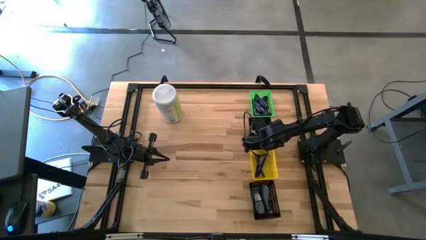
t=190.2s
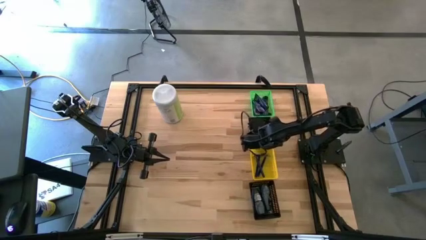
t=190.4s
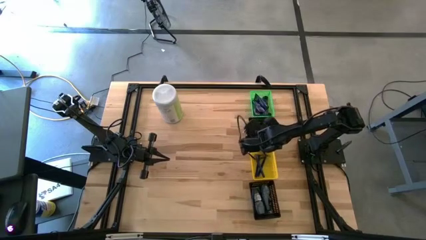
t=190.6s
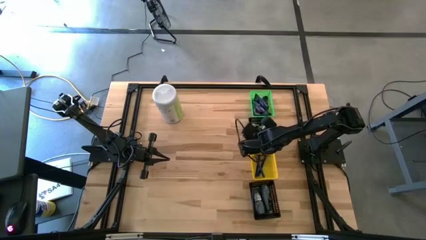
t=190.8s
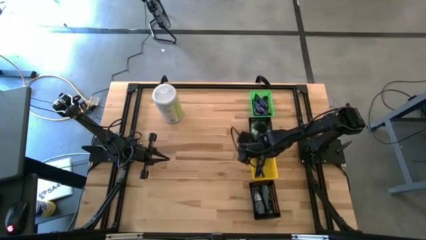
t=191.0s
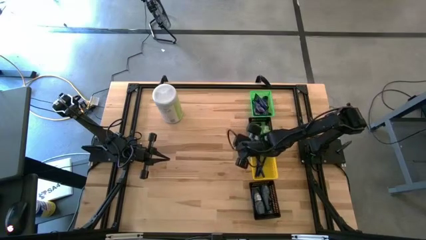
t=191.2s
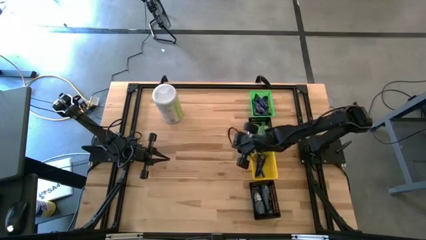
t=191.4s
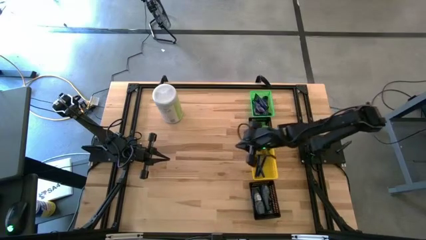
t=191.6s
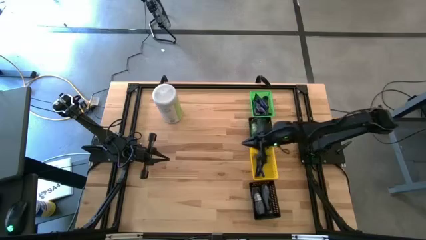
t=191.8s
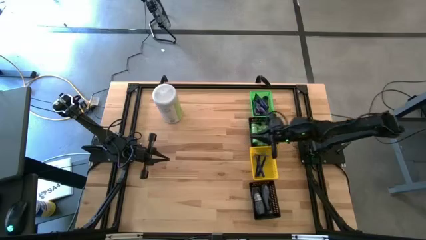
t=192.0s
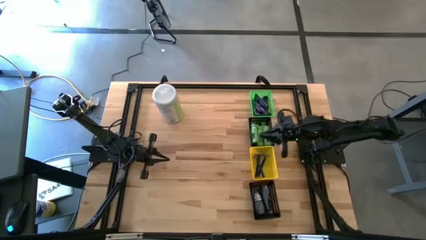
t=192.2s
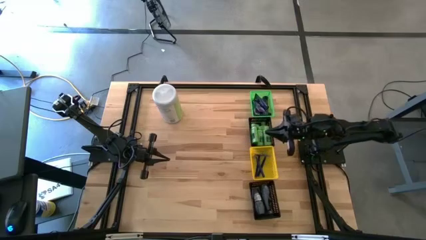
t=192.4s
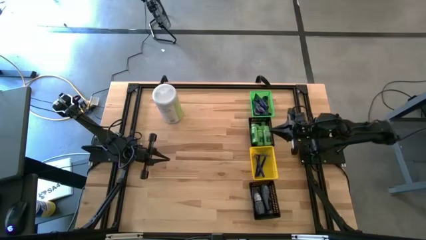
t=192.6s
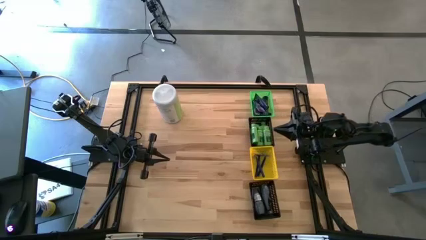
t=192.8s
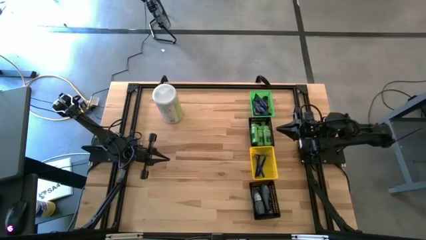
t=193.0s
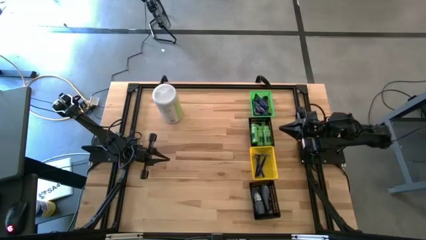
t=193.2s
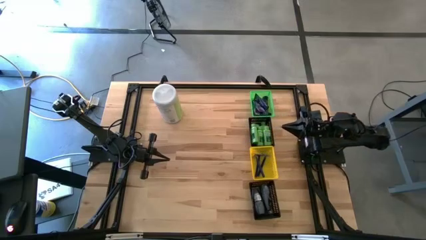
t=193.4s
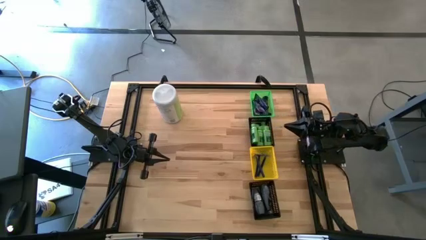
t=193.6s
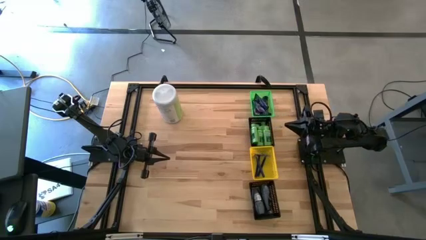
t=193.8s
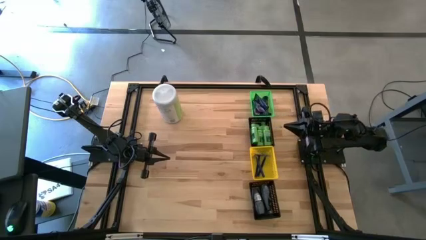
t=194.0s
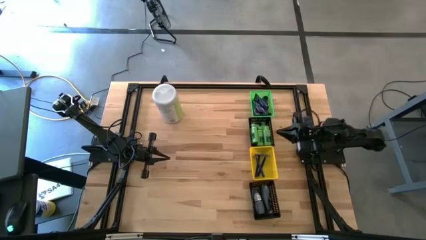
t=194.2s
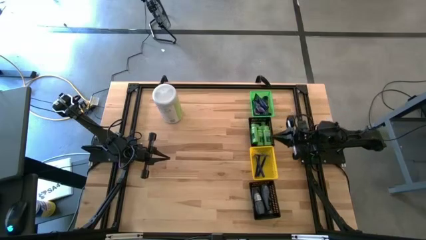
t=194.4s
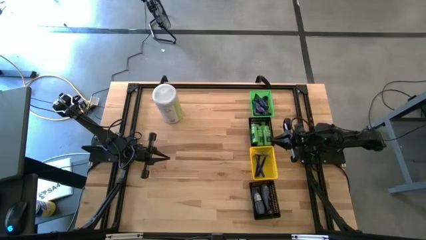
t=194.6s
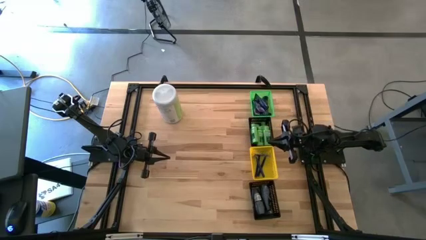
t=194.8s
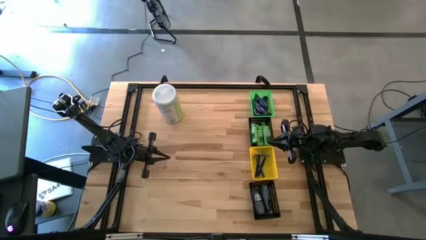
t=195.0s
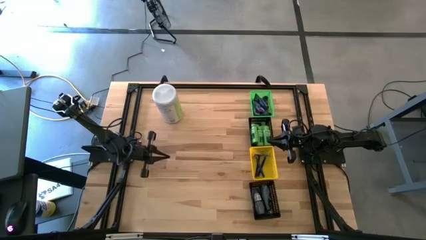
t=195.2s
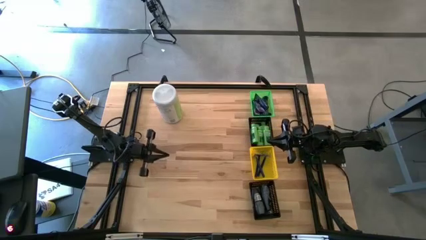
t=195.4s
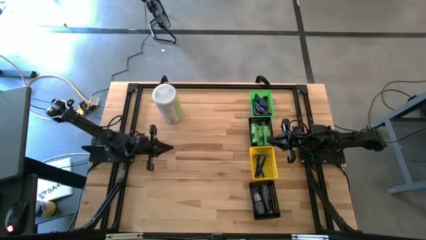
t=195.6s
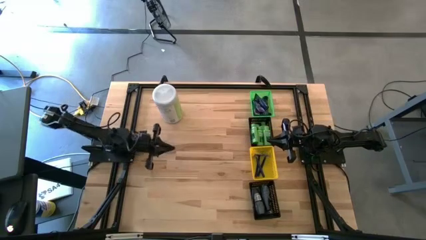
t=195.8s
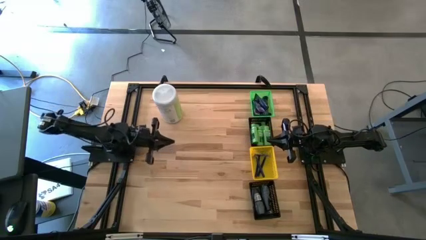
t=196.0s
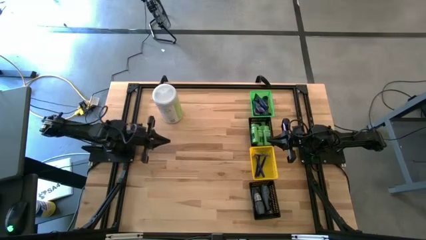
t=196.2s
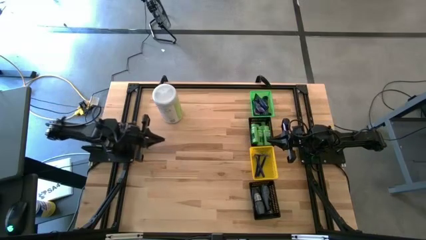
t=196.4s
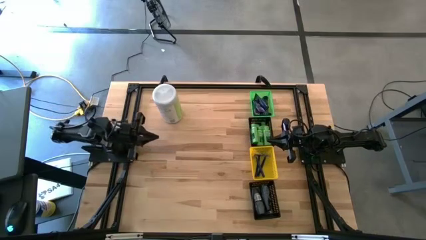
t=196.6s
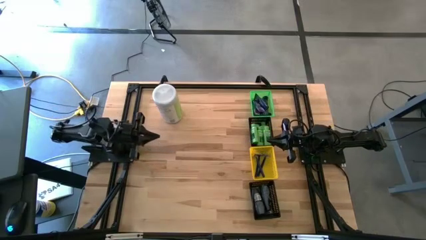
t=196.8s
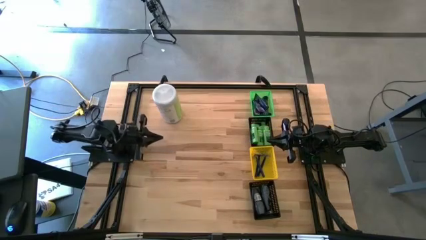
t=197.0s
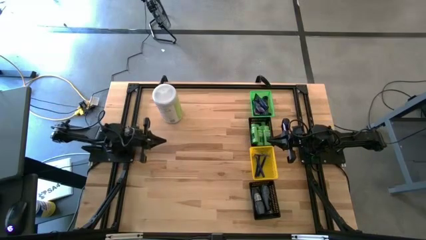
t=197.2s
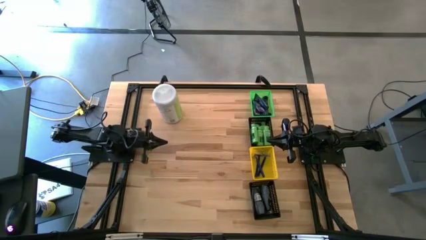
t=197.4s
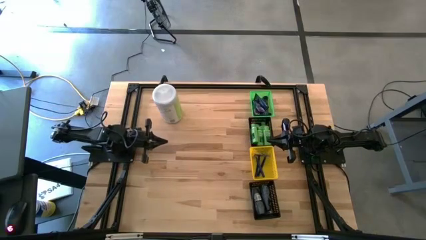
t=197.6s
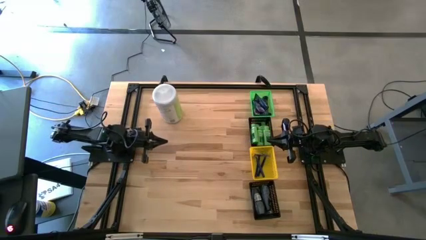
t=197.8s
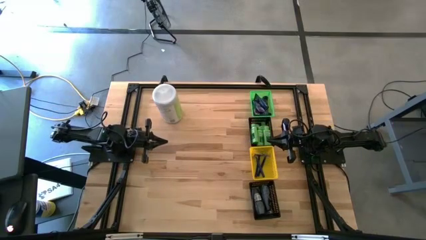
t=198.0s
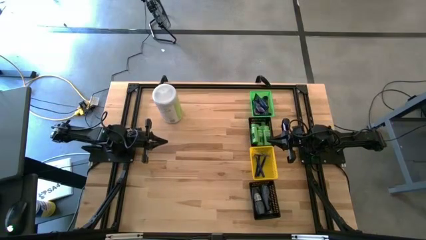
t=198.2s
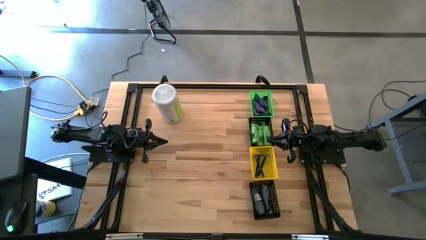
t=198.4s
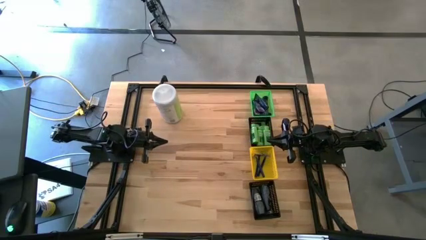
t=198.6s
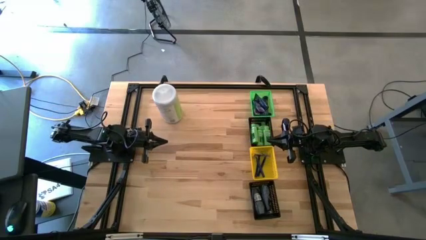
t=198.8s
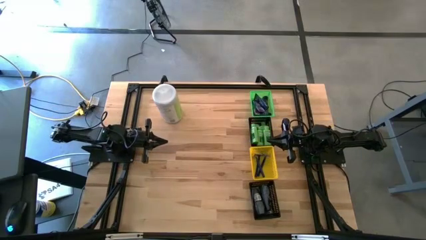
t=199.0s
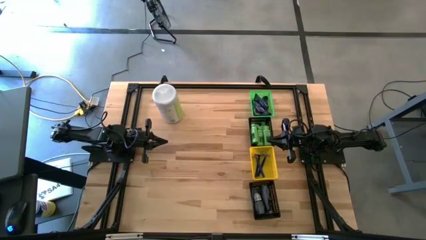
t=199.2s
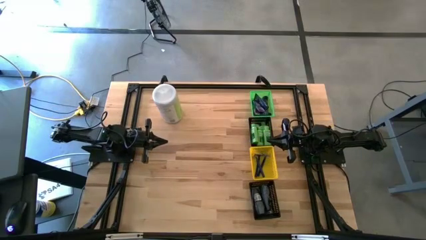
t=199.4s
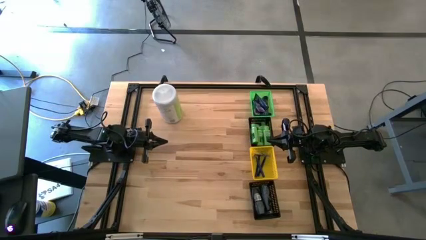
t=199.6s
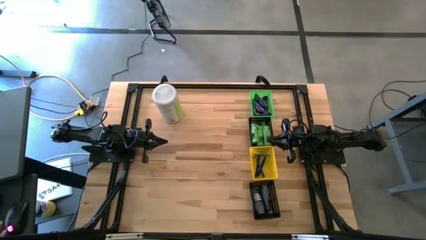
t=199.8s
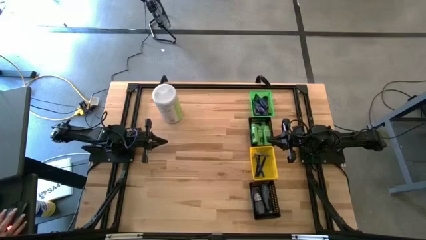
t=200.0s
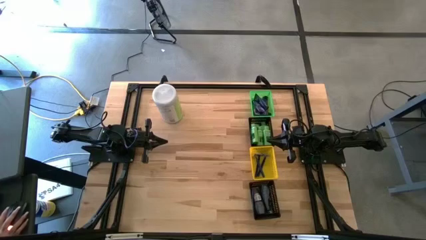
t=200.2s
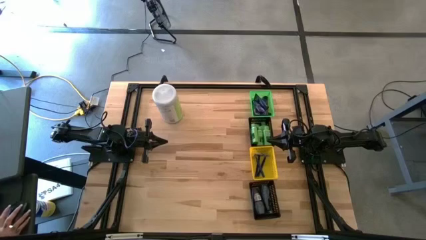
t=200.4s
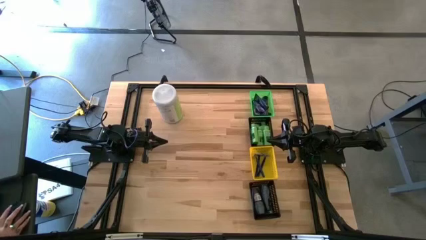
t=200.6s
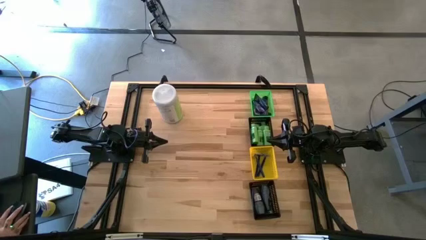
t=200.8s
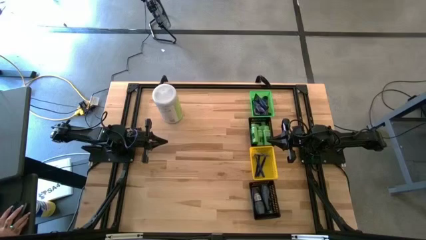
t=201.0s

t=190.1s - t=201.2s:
Task: Pick & Place Travel size toiletries
Return to Home Position

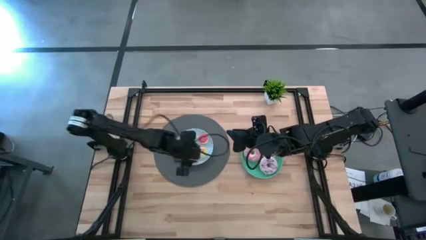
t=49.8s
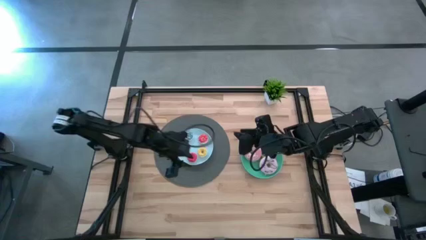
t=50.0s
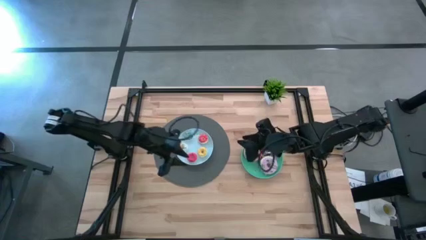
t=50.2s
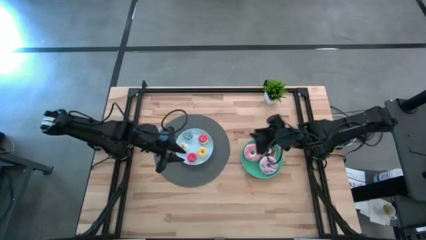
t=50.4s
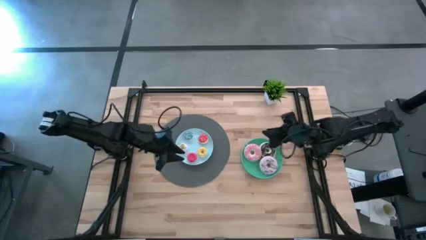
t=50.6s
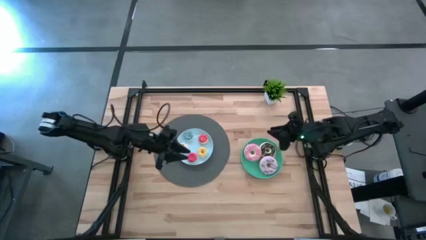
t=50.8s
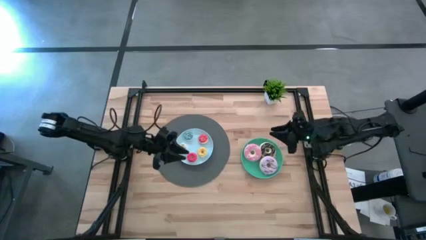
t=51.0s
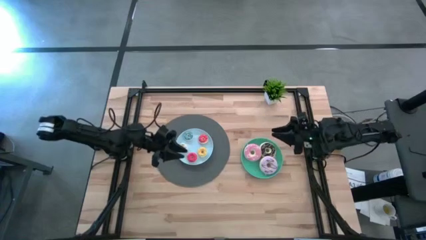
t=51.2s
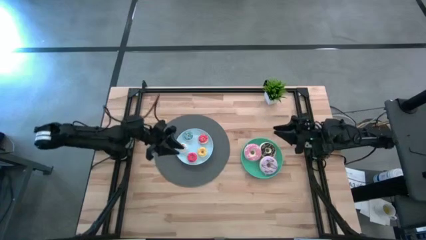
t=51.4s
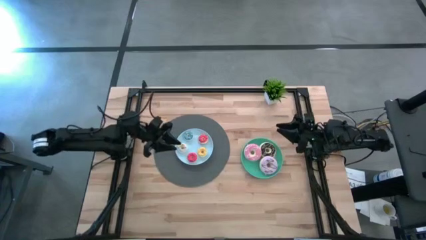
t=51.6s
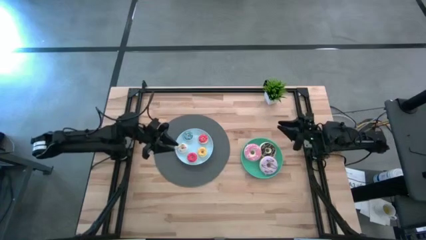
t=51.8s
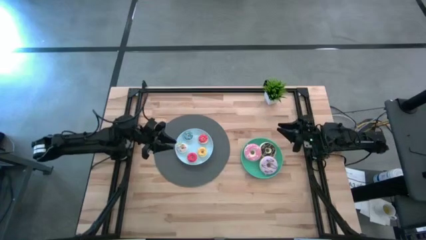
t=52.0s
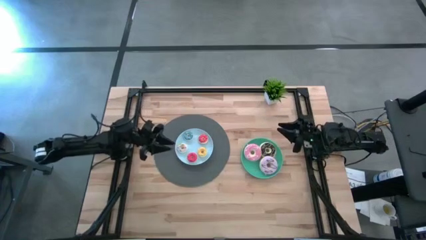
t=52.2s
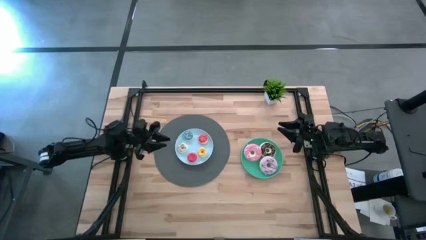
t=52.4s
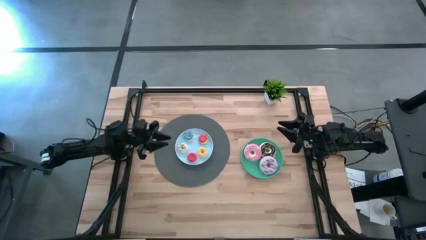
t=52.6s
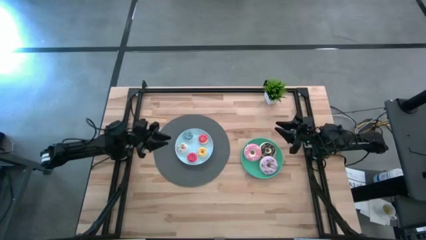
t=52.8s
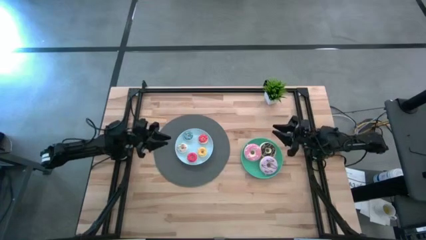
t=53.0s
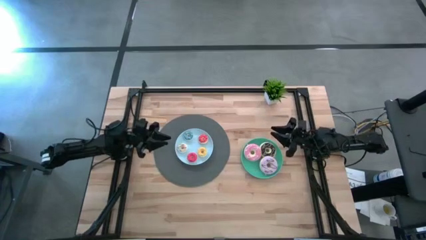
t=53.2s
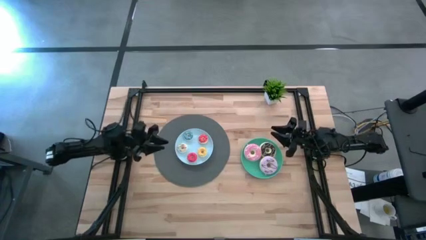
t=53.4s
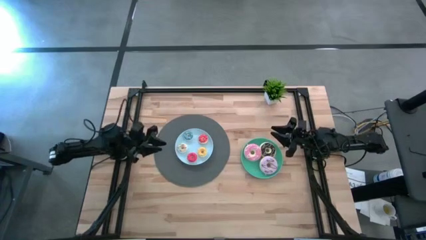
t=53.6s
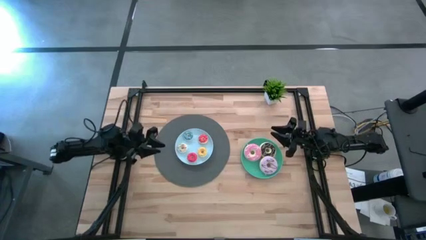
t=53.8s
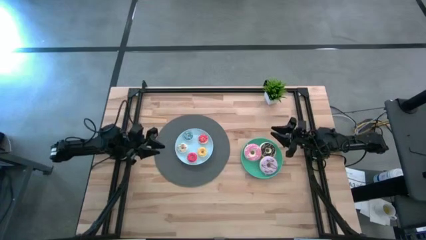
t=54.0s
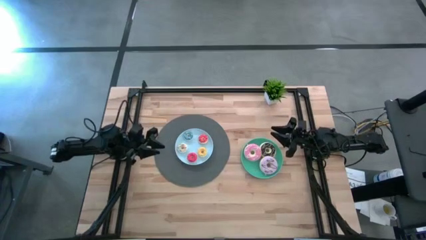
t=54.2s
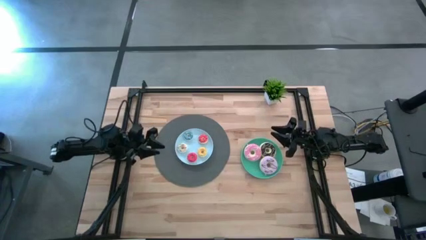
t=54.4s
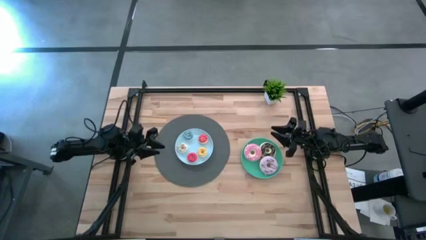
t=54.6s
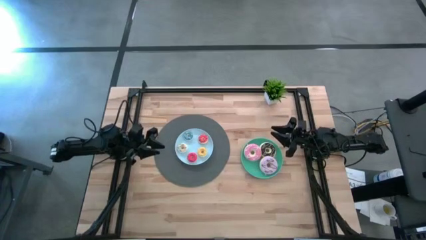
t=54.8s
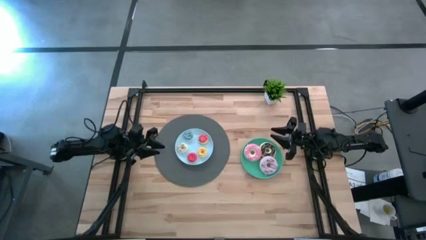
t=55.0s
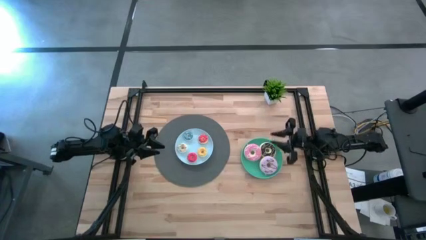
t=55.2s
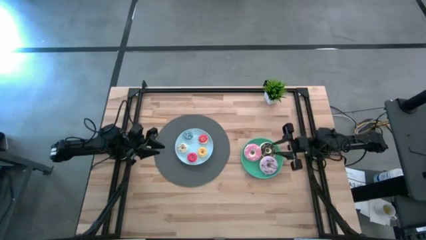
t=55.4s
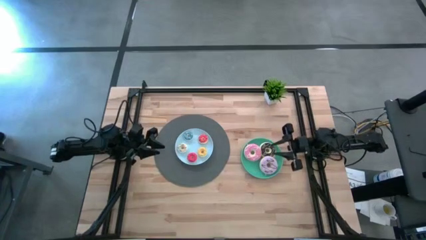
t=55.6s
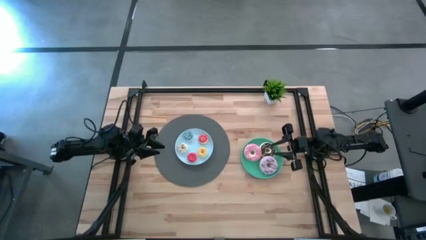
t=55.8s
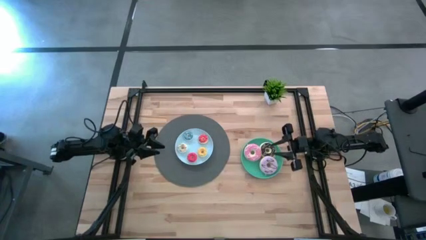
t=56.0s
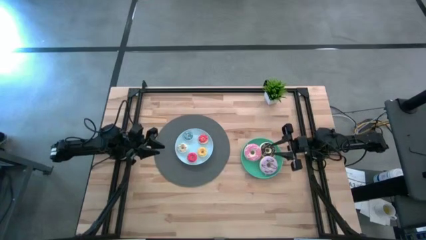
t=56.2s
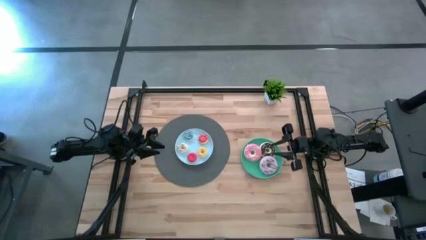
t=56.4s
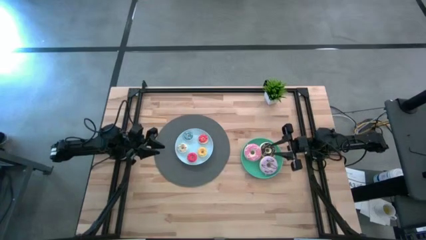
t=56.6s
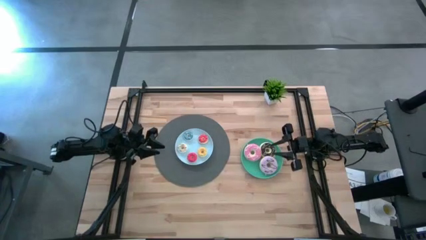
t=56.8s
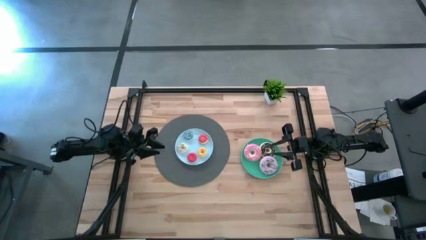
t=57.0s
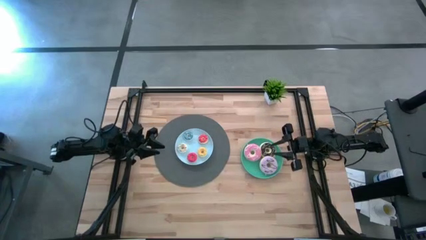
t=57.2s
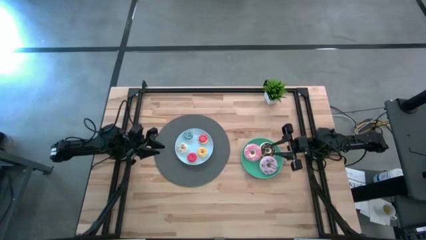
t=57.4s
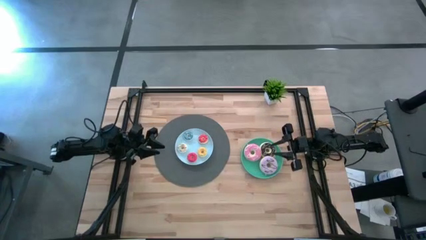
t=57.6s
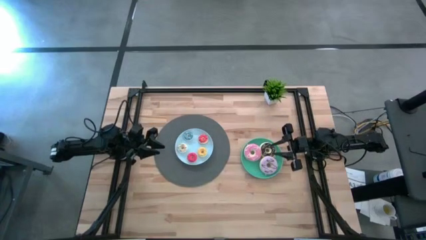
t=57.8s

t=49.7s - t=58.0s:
Task: Pick & Place donuts
Return to Home Position
